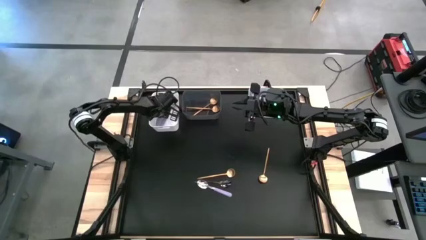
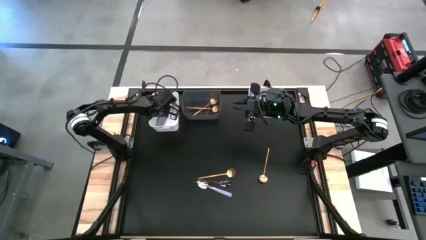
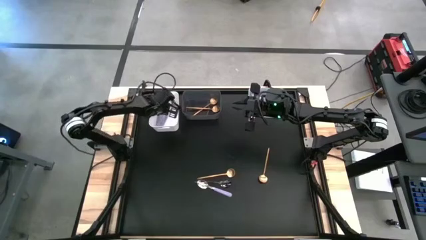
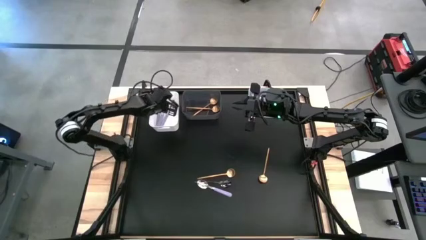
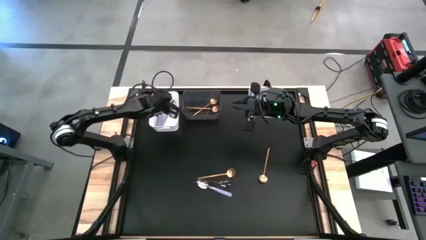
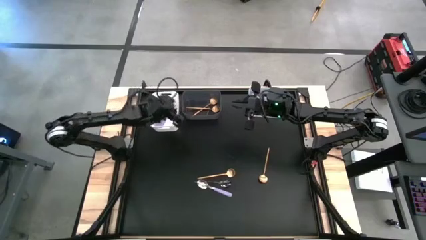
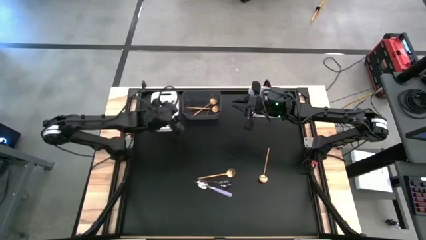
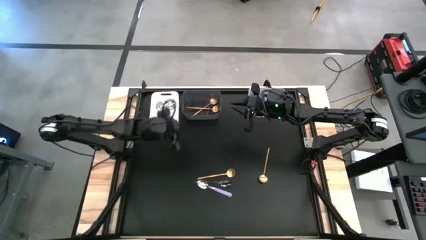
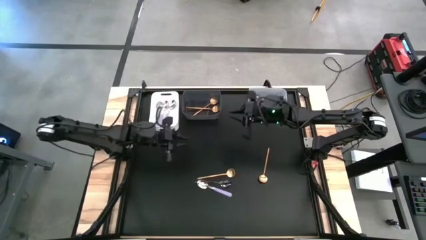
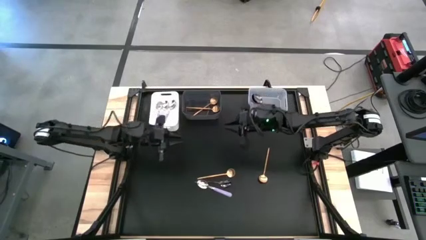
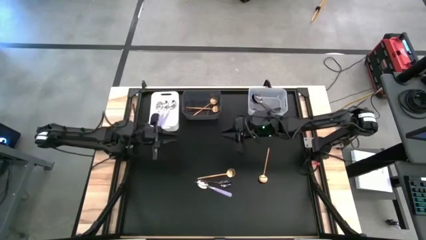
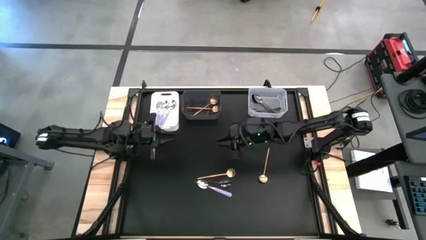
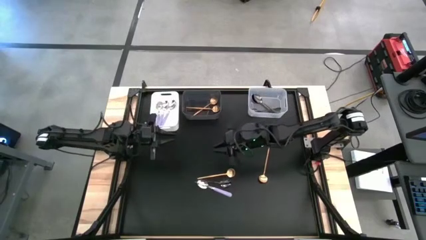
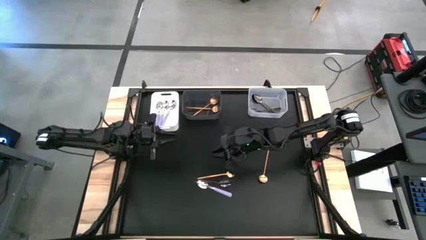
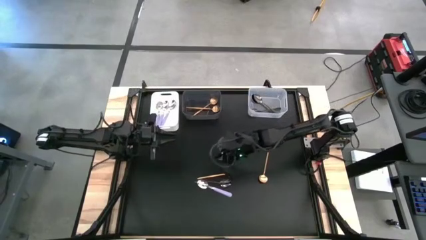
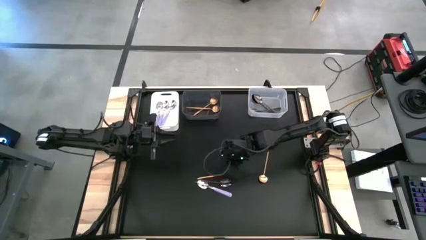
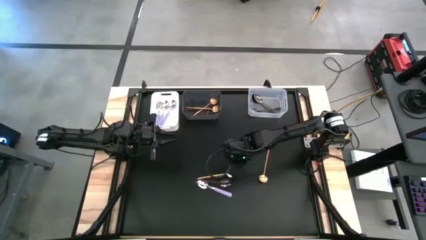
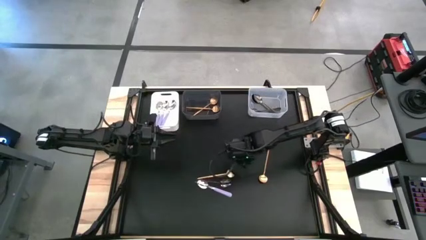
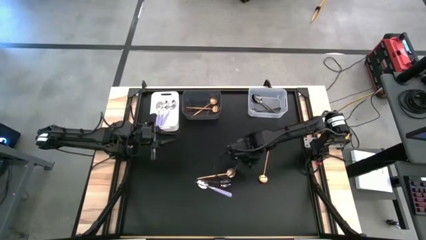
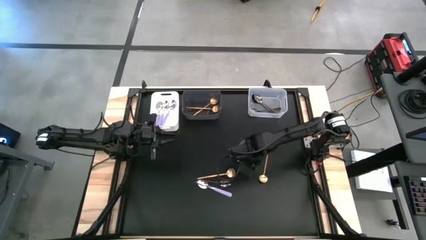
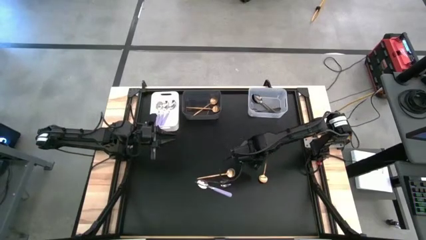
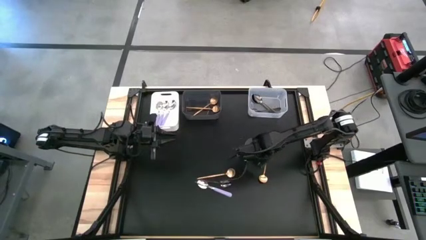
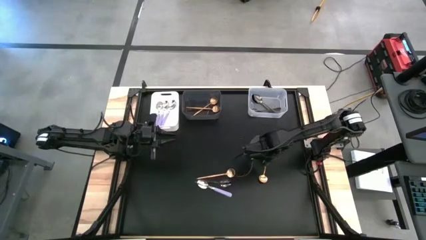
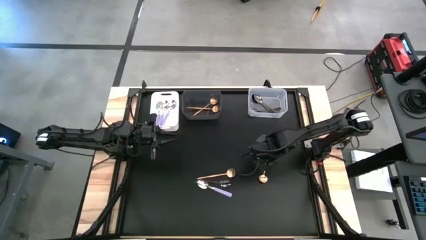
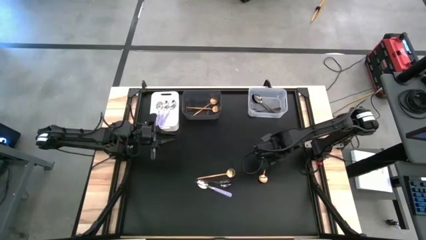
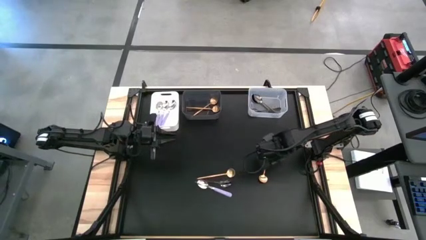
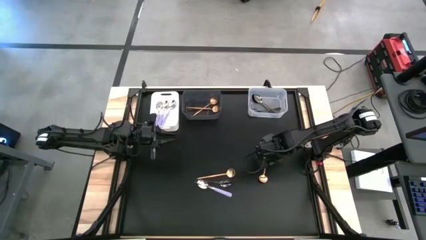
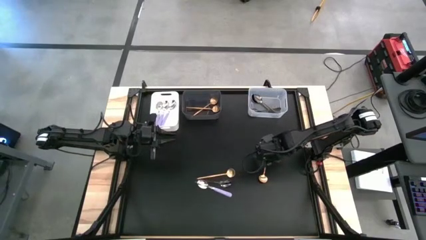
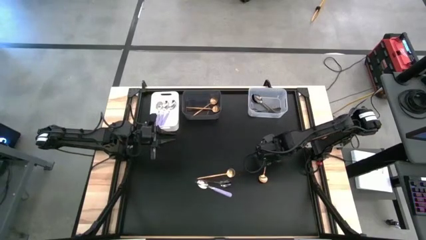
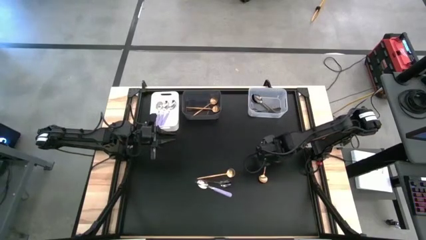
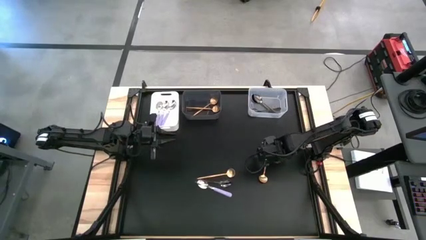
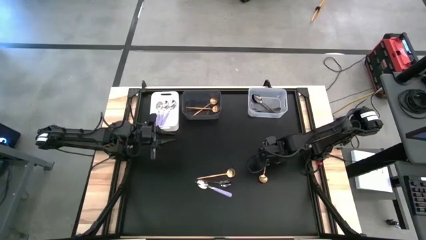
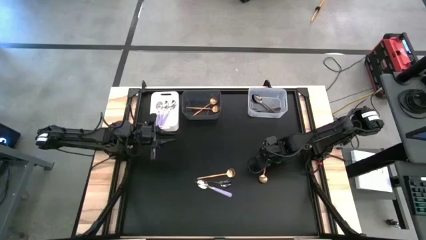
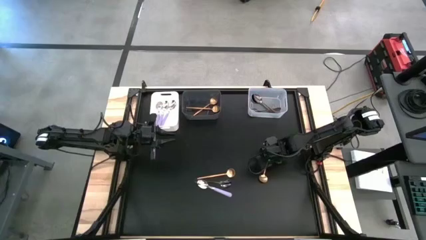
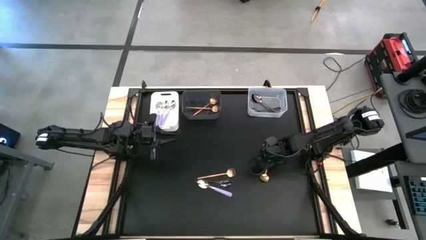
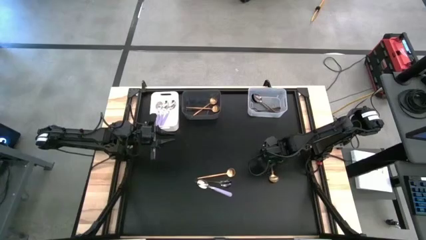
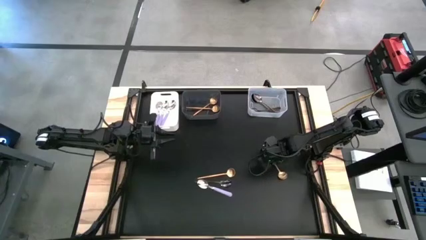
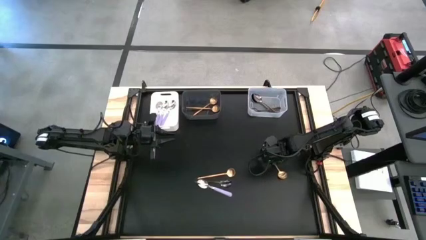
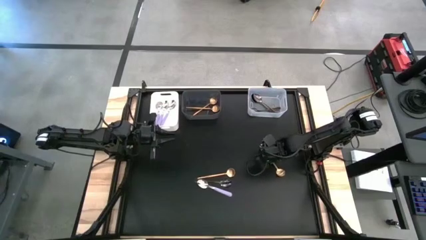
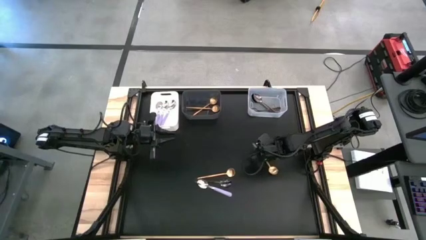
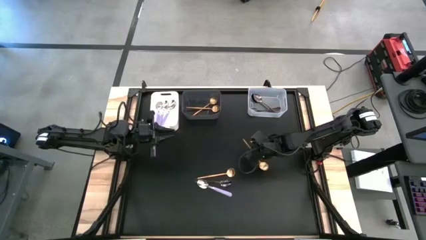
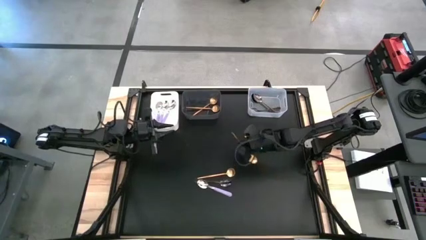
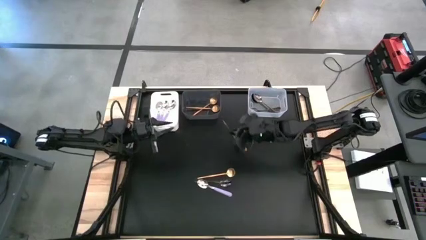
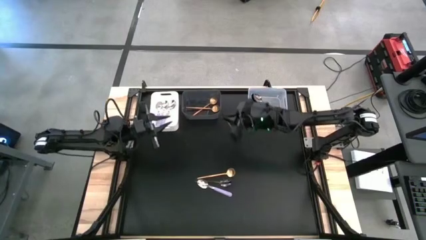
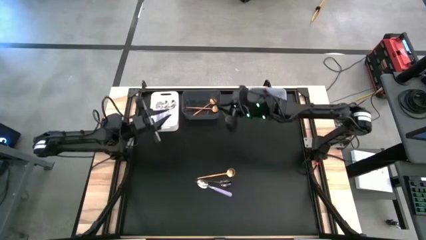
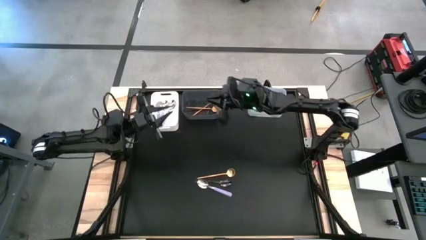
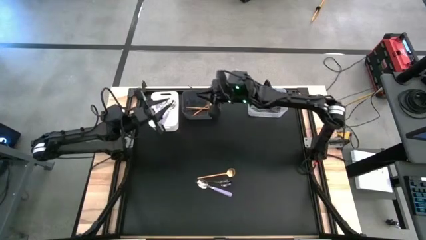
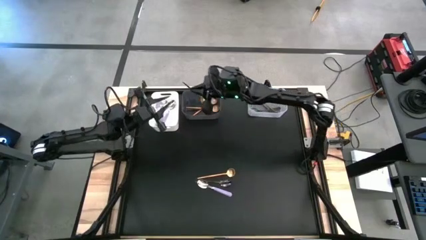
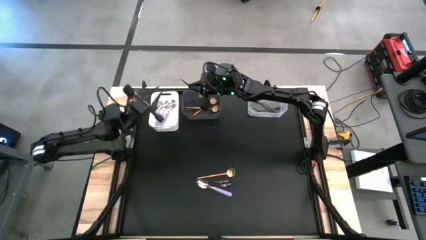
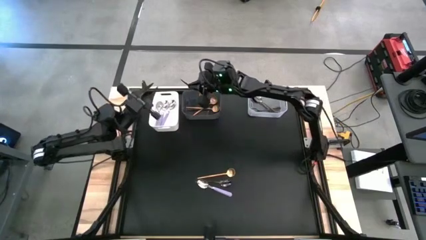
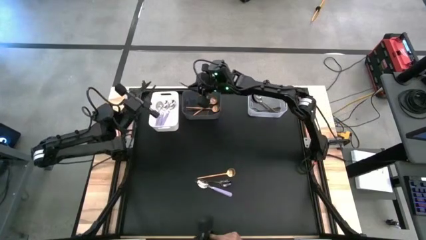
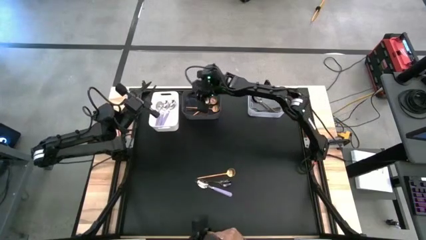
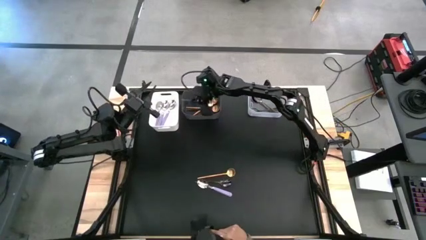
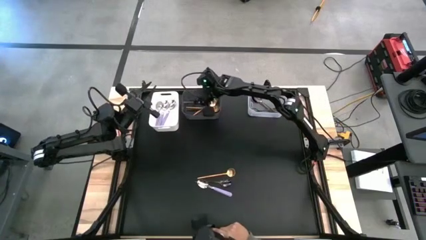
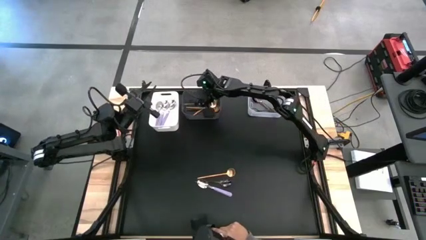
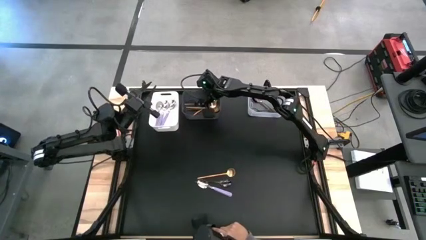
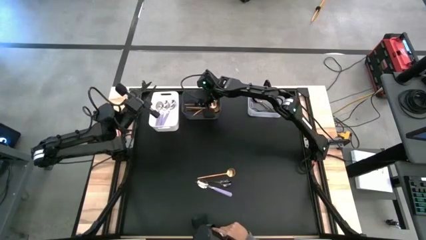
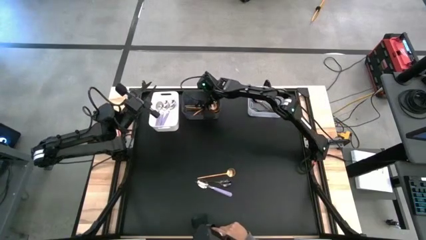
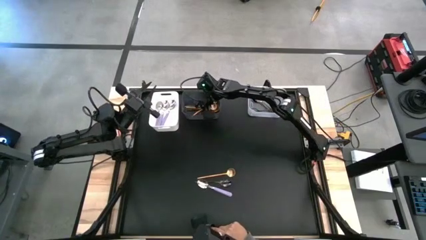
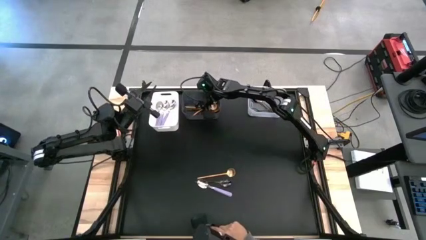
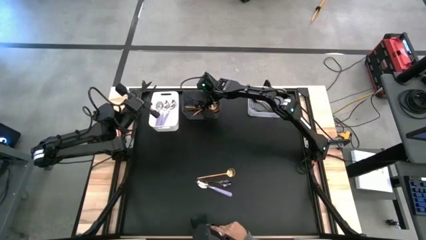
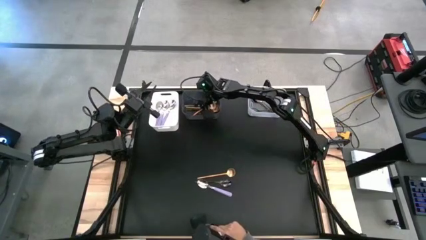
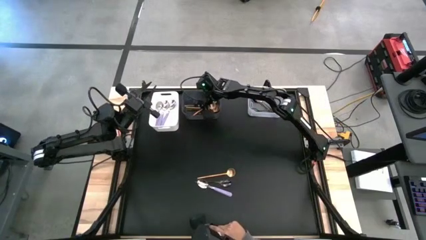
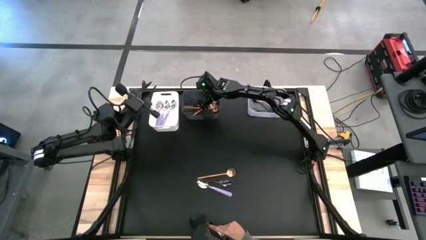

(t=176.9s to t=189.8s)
Task: Sort silverware by color (type)
Put the gold spoon into the black bin
